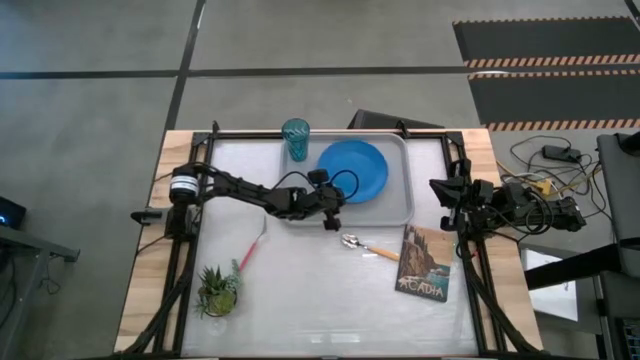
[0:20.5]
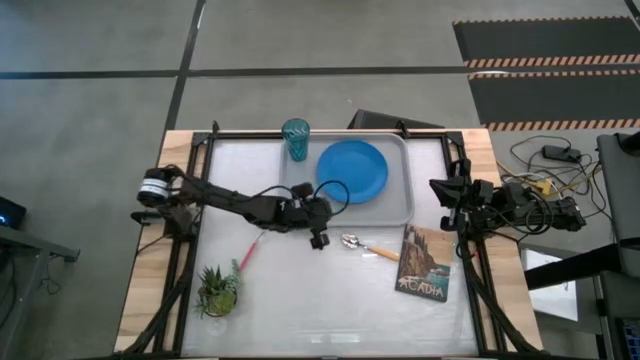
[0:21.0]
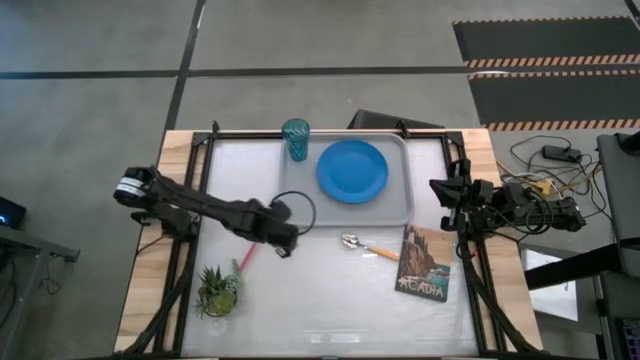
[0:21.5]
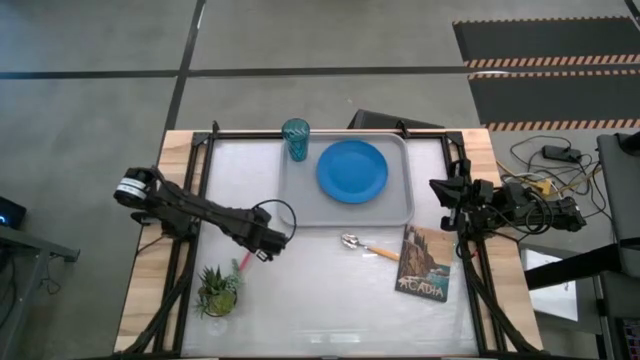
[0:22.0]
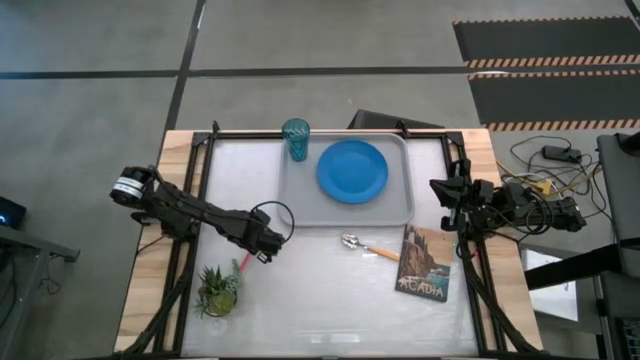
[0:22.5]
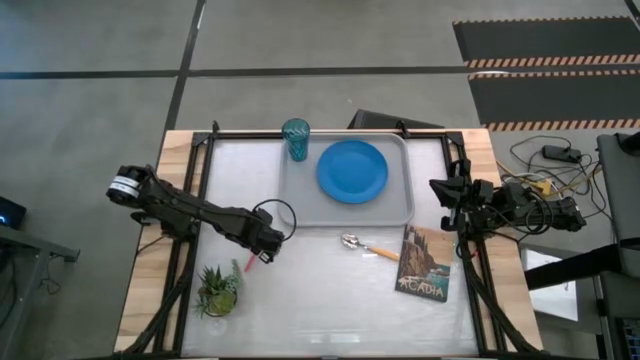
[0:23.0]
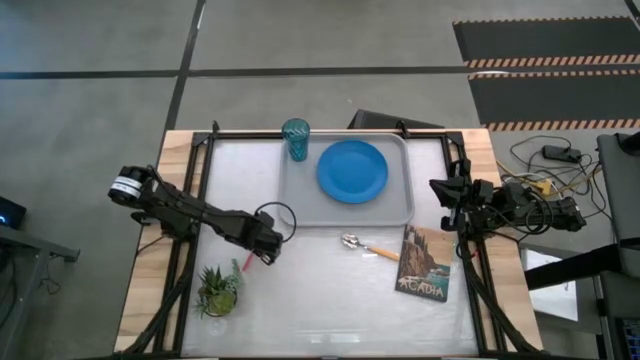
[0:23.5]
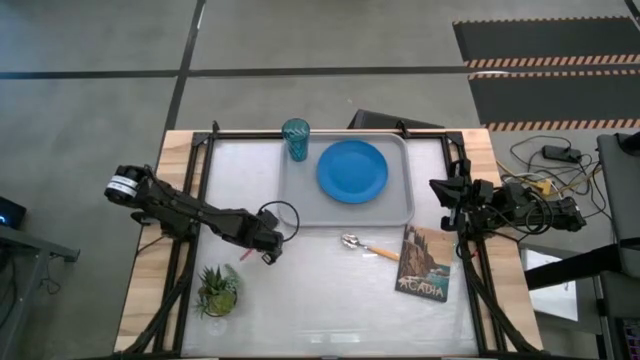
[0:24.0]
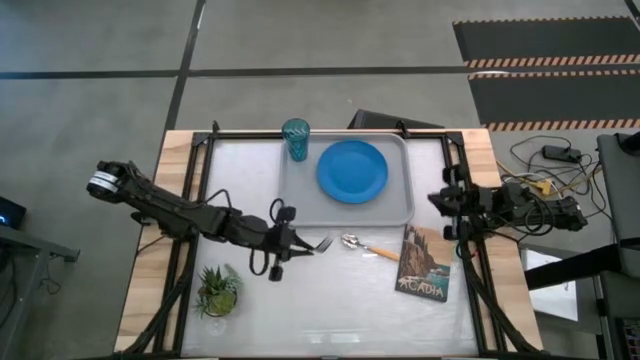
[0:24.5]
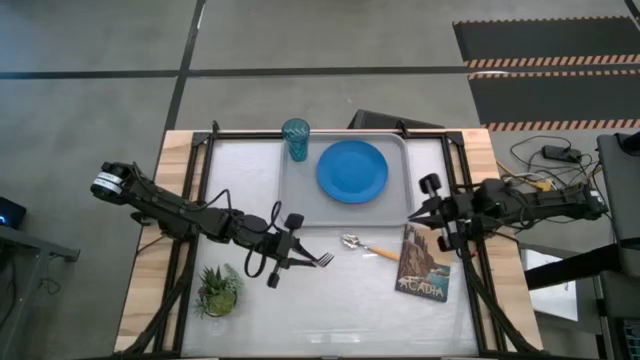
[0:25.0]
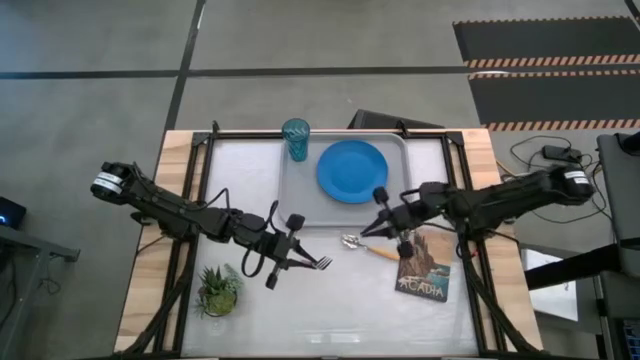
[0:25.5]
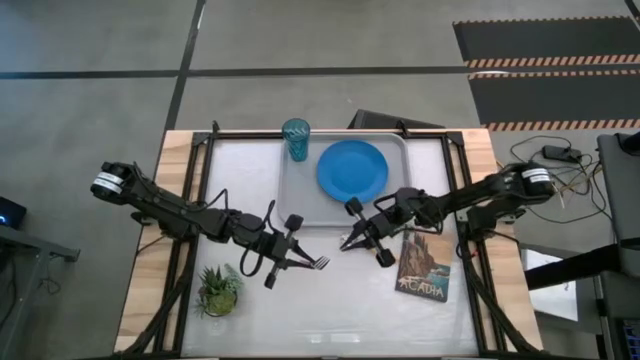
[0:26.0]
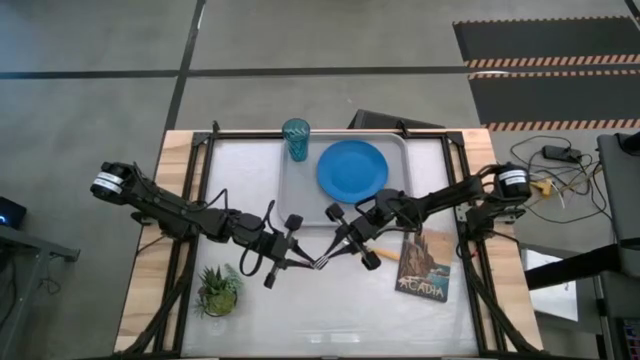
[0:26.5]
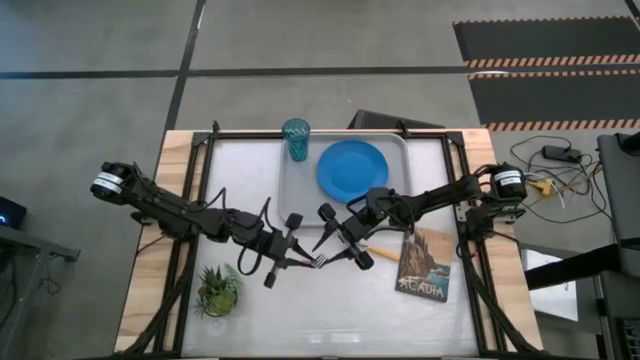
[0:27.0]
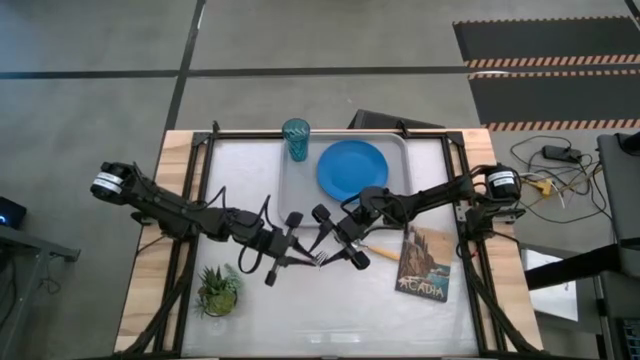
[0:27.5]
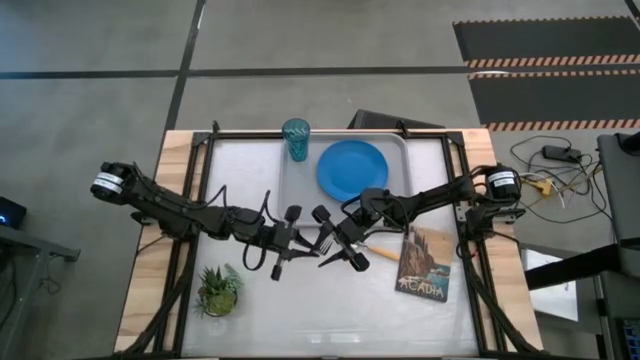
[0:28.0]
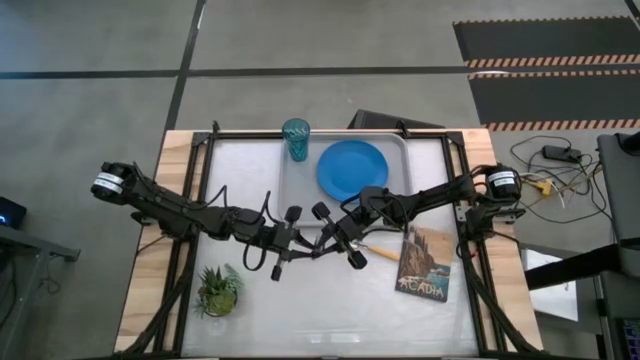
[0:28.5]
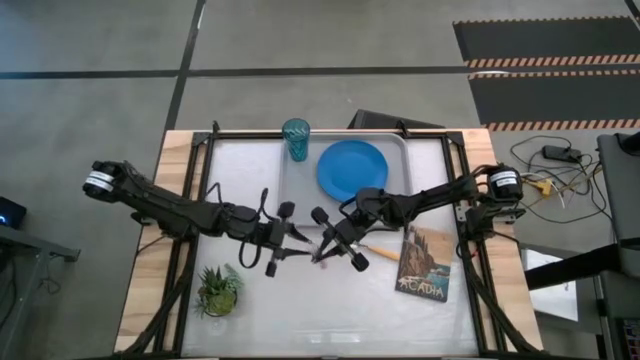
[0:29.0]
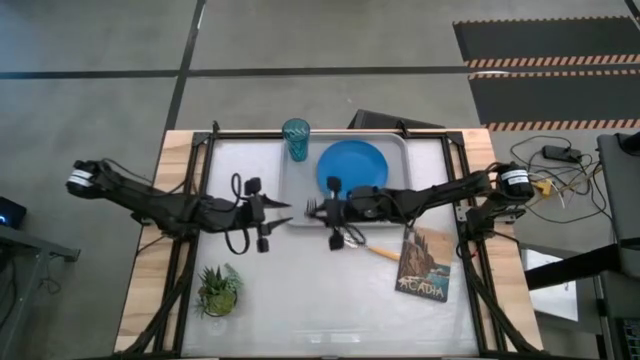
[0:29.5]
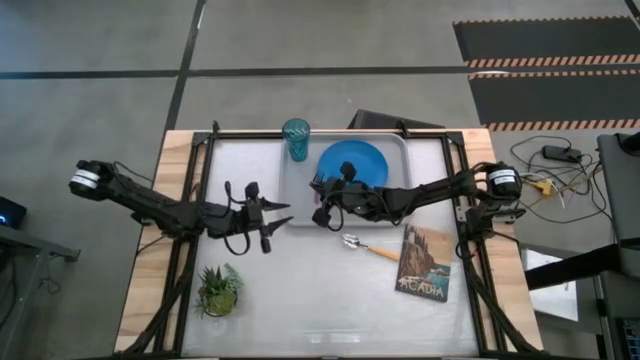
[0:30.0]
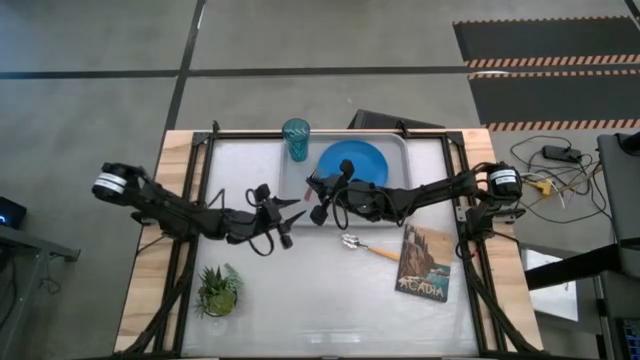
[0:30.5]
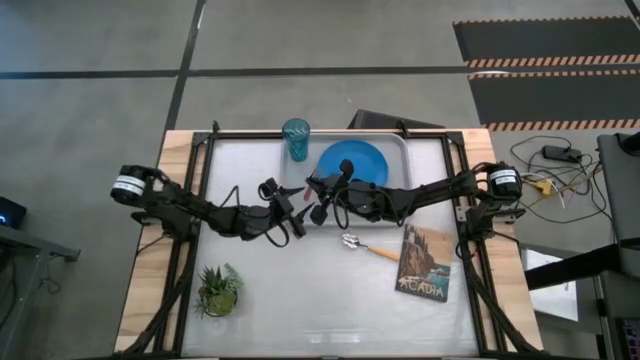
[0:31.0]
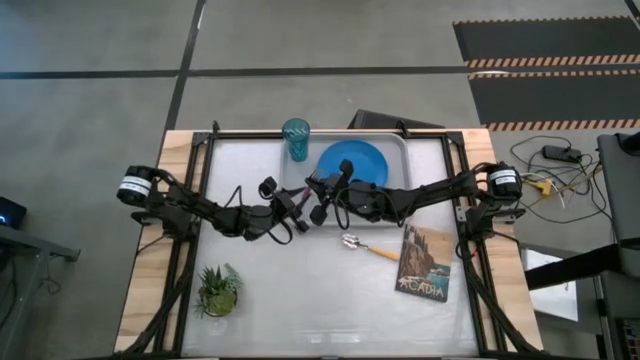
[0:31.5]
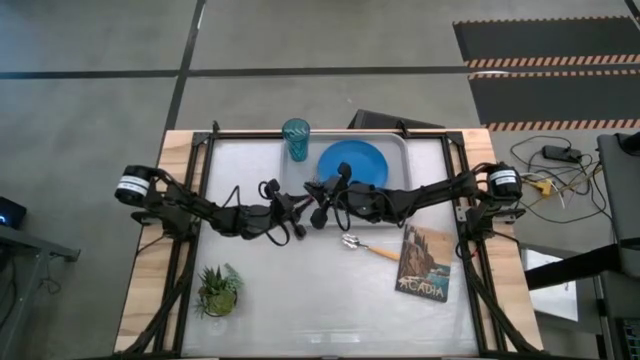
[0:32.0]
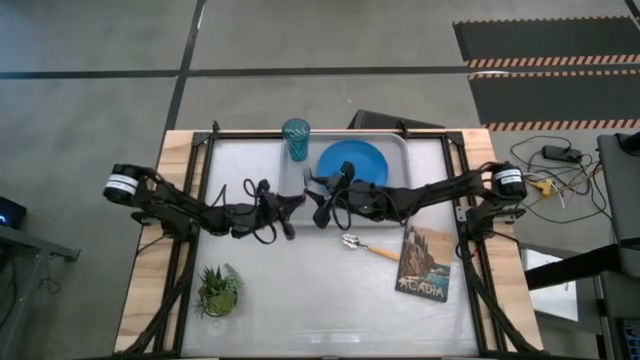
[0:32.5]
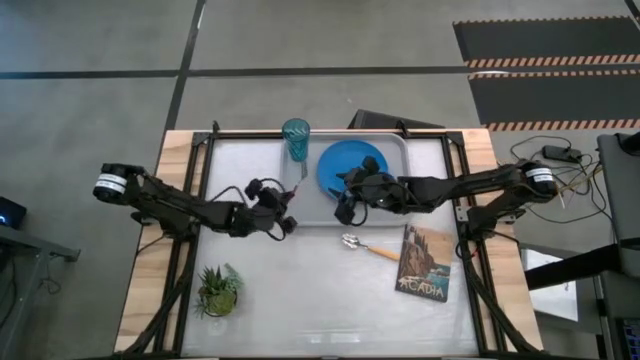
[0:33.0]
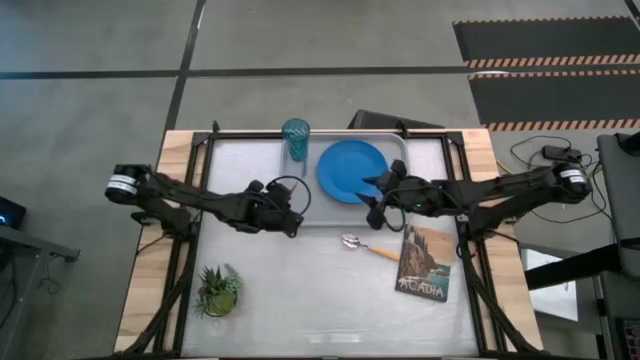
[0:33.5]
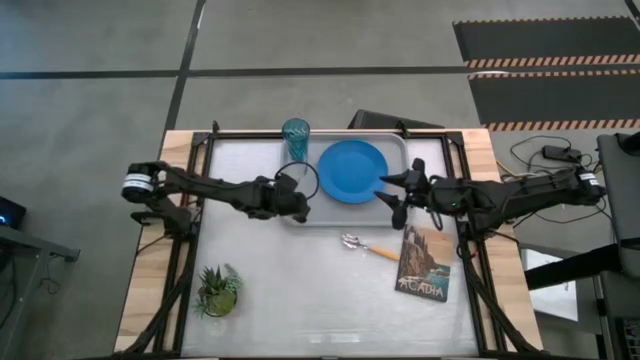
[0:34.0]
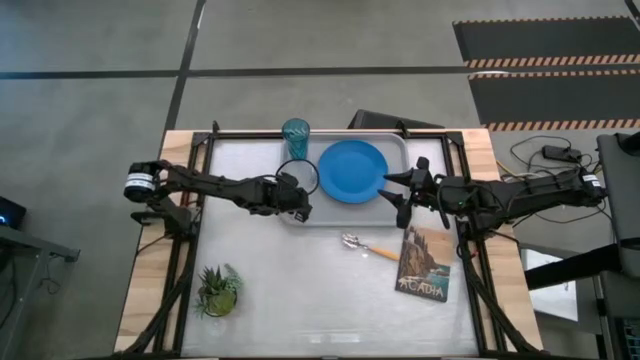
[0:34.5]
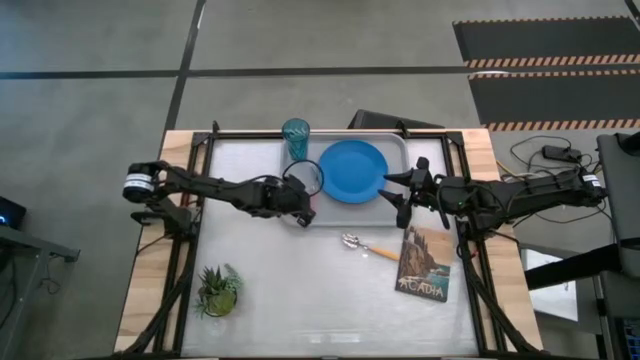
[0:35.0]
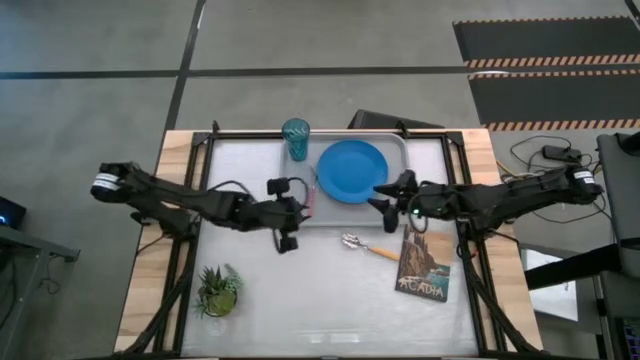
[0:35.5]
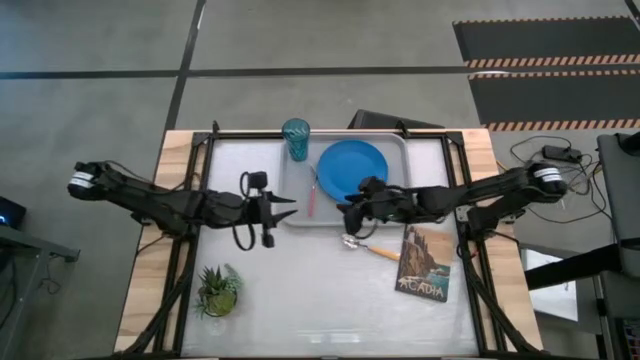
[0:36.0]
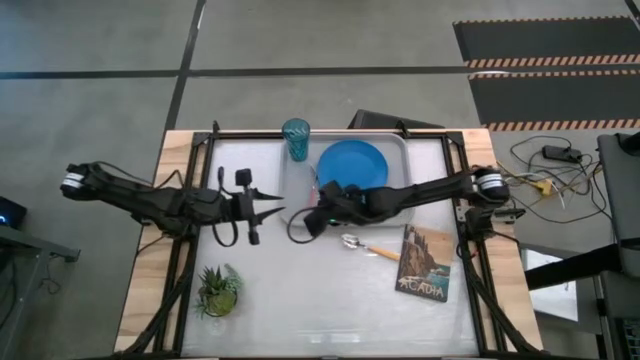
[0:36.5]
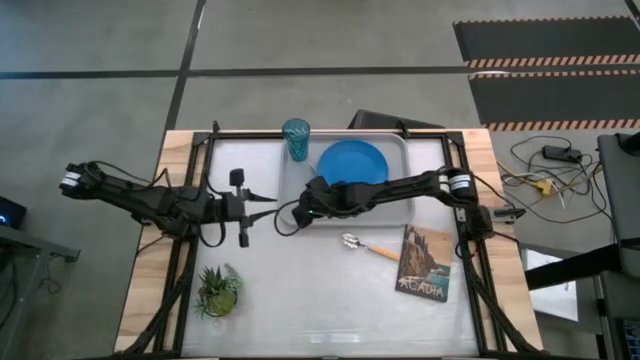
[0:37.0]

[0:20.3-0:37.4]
Task: Pick and place plate/cup/fork/spoon on tray
Put the pink fork on the gray serving tray to the left of the blue plate

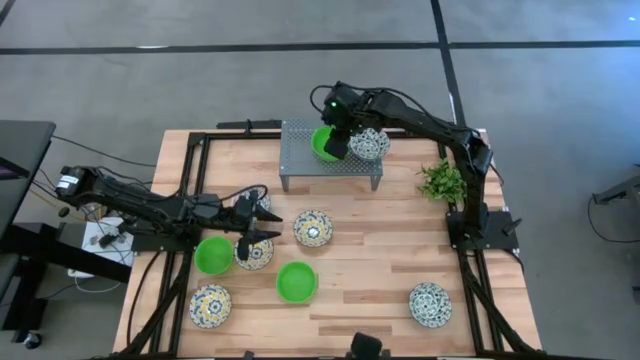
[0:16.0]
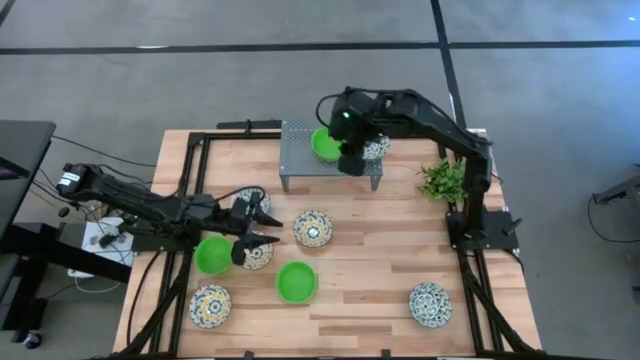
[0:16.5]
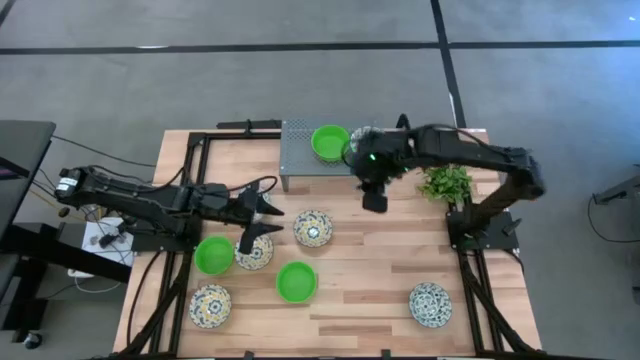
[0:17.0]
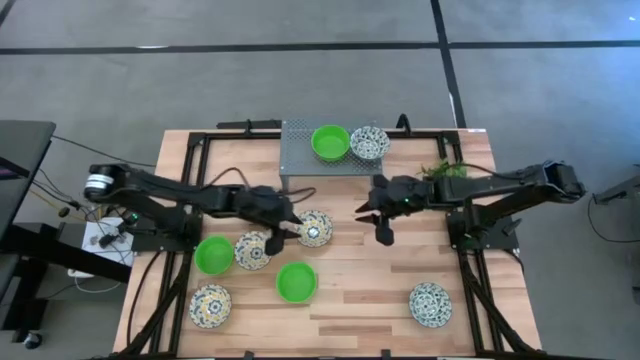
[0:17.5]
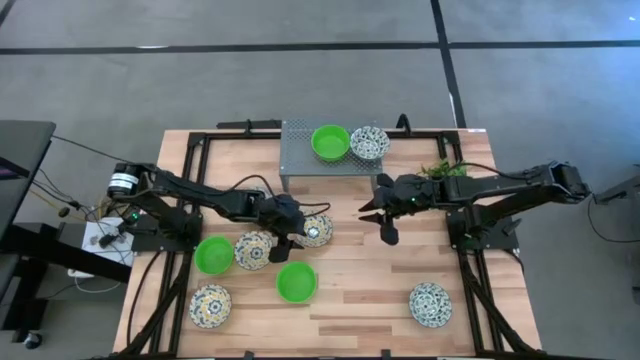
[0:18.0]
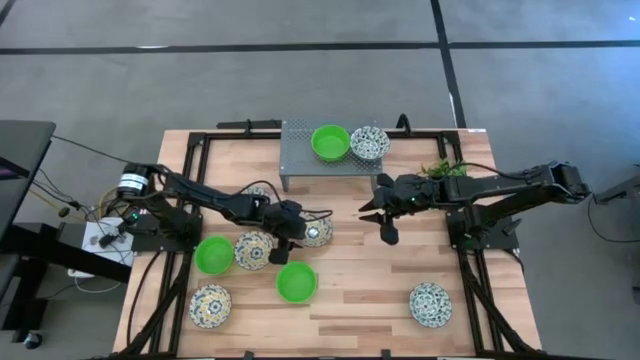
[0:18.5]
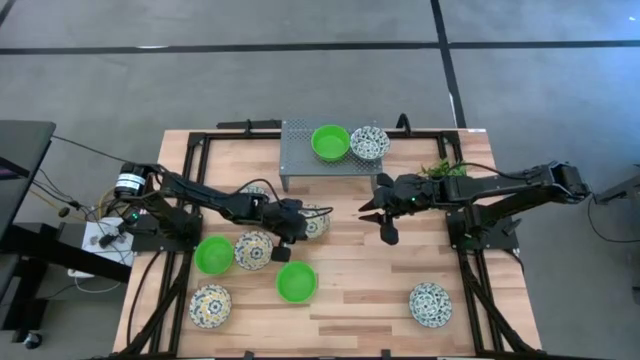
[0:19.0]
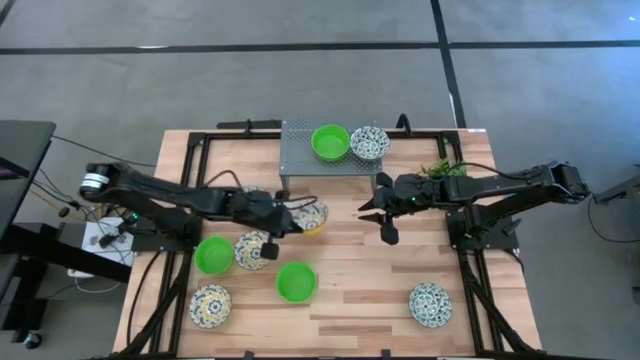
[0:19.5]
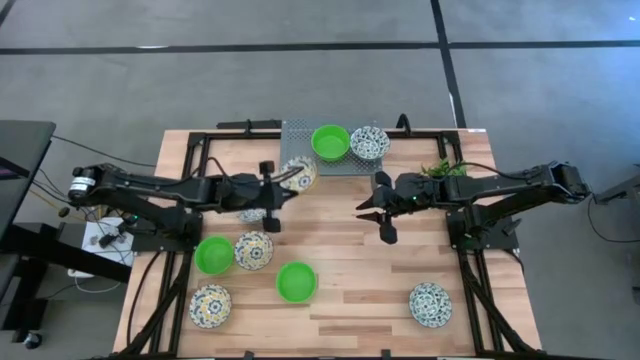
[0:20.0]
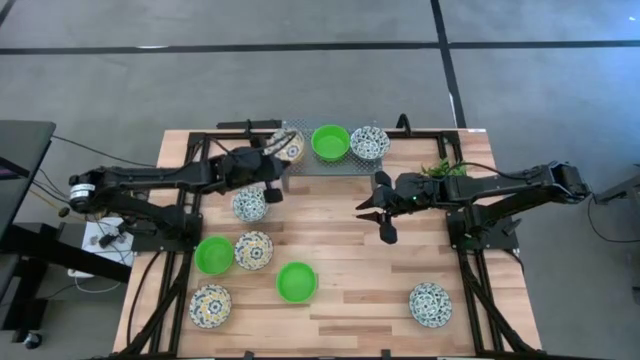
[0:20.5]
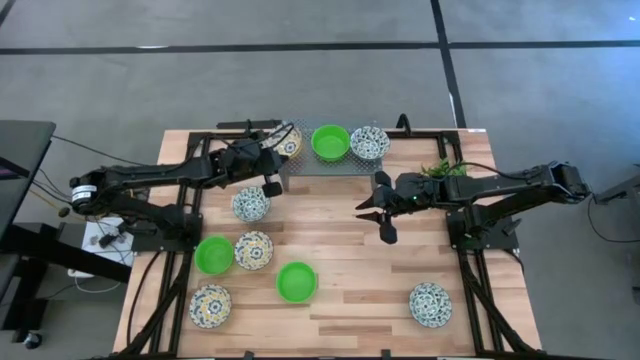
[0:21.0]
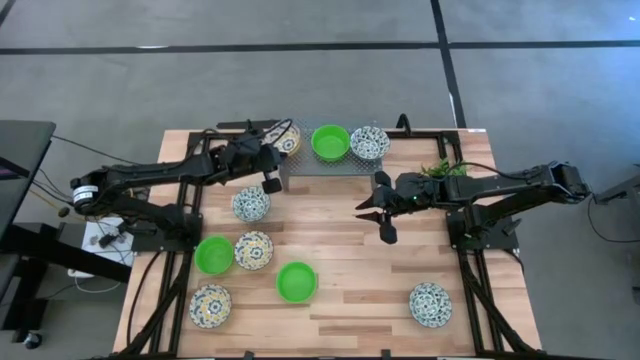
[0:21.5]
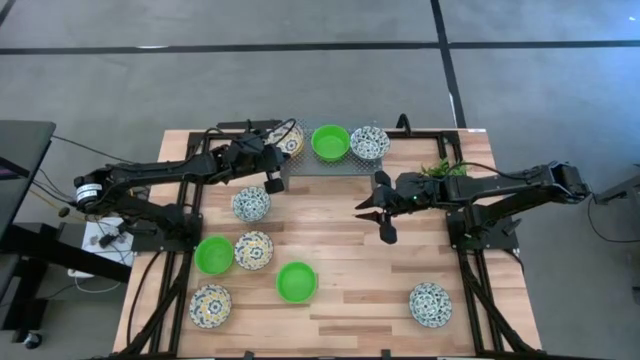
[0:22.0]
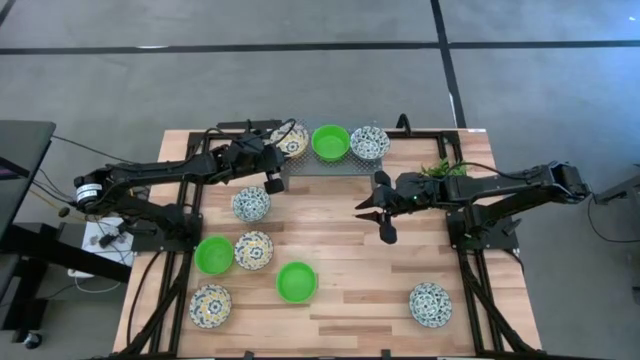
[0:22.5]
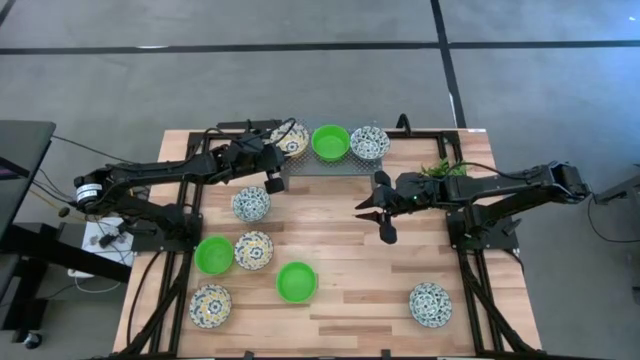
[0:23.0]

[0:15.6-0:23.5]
Task: Pick & Place Mini bowls
Put the top right yellow patterned bowl on the shelf
